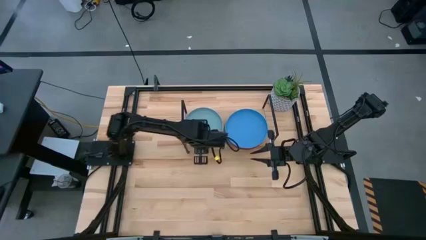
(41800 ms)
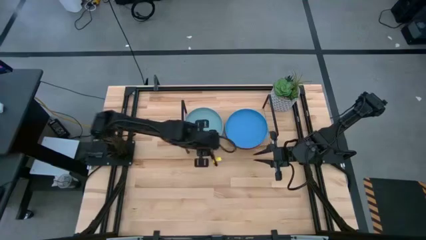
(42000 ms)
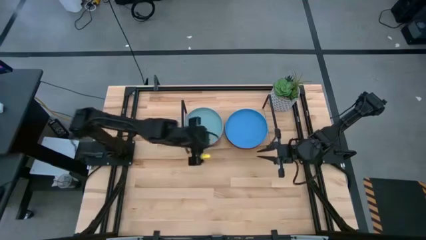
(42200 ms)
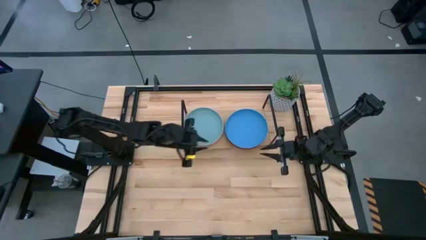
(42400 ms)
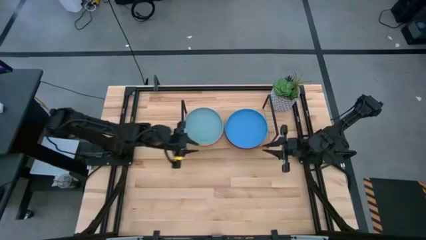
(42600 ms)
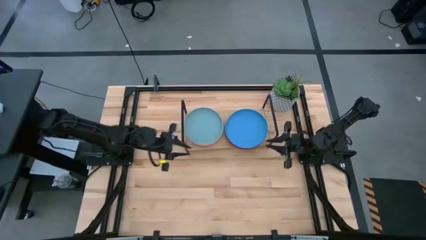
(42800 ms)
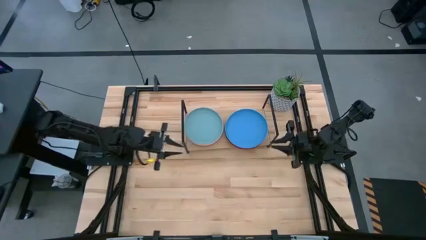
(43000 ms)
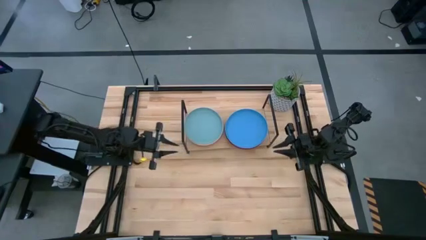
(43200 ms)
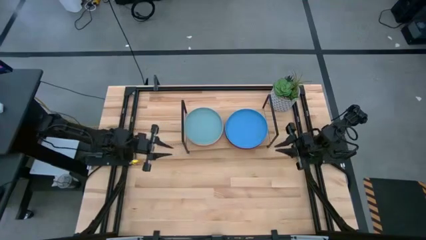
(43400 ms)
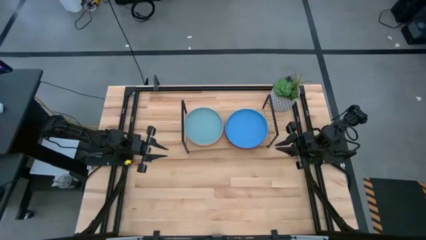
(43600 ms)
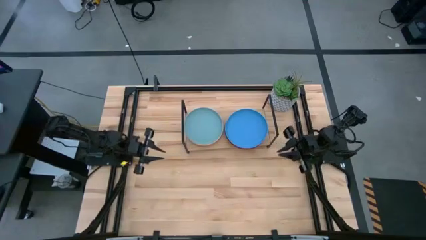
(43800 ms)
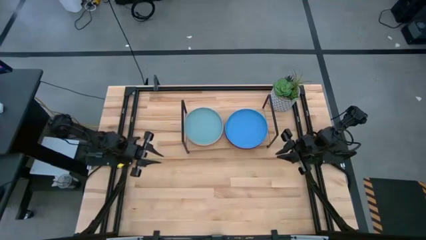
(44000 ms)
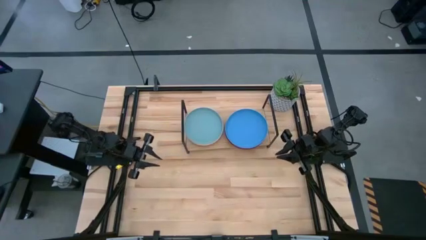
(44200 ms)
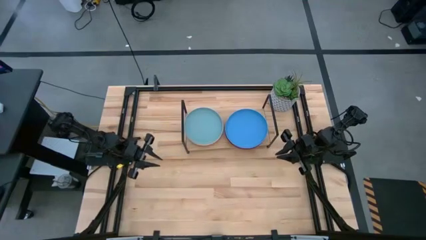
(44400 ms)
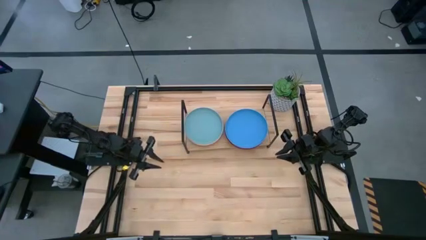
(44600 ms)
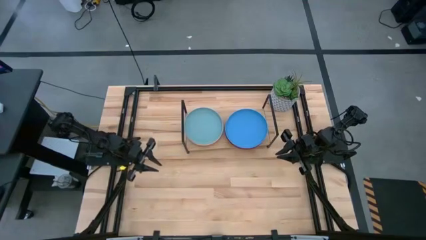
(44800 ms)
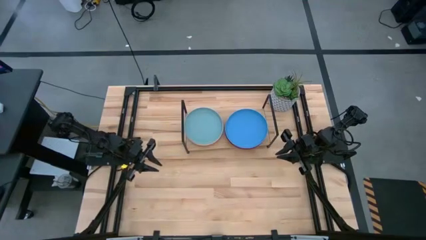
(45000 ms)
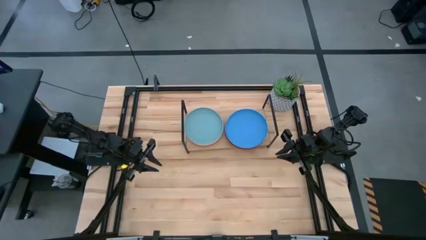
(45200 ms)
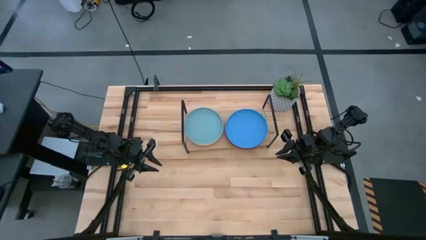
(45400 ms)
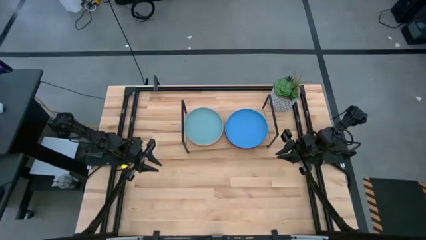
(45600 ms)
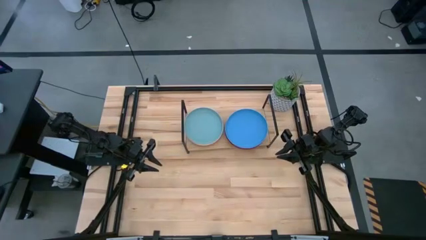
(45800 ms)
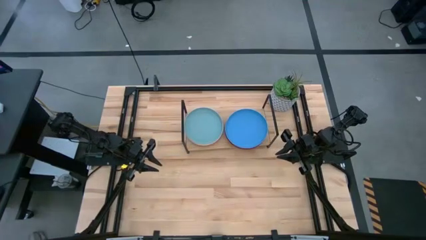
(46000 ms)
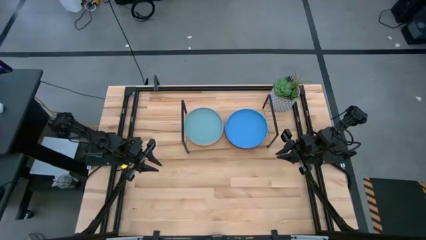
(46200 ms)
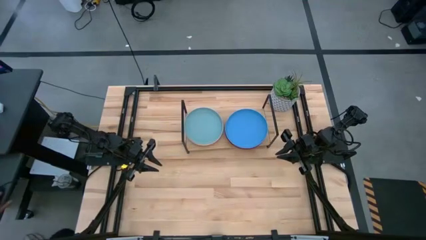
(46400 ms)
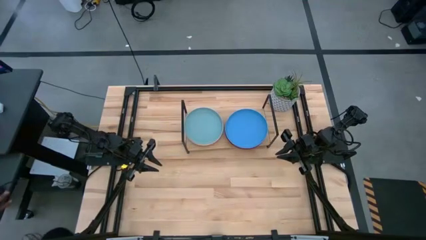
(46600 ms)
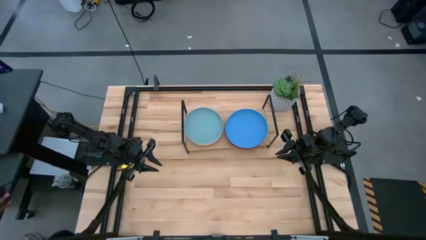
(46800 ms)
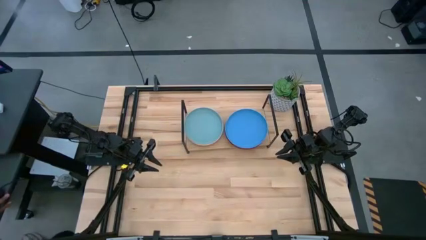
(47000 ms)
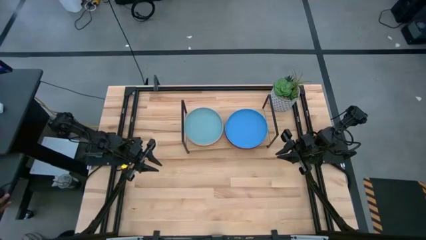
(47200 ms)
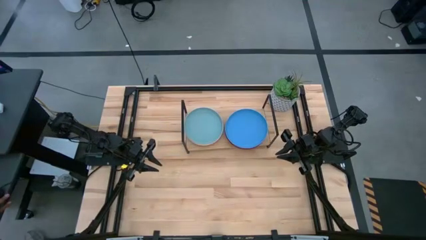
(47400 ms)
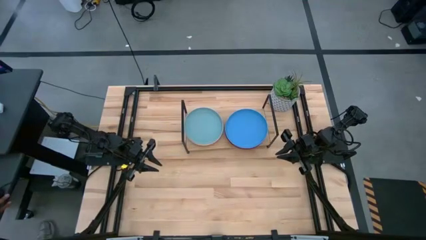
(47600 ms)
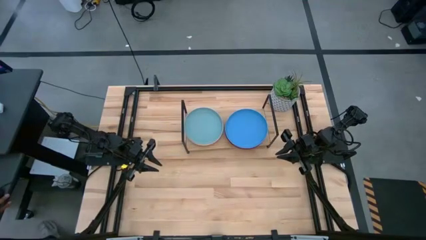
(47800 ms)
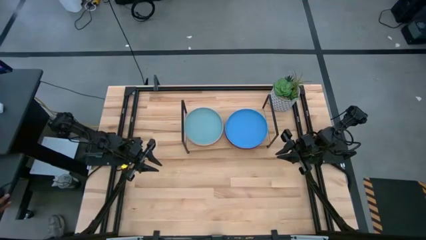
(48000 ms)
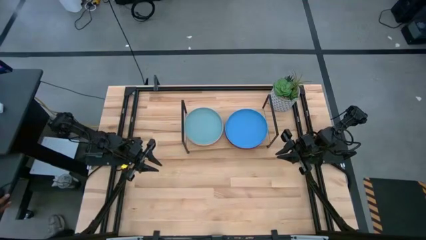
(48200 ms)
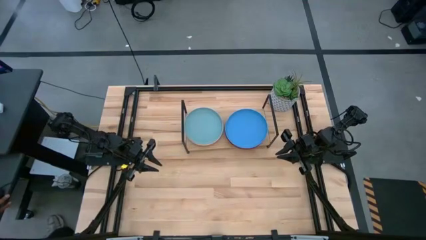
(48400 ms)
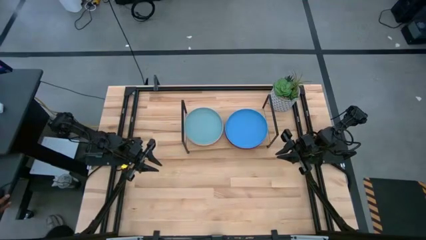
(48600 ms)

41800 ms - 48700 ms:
Task: Place and stack plates onto a shelf
Return to Home Position

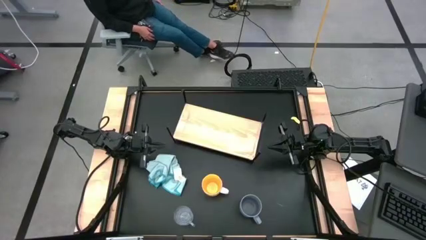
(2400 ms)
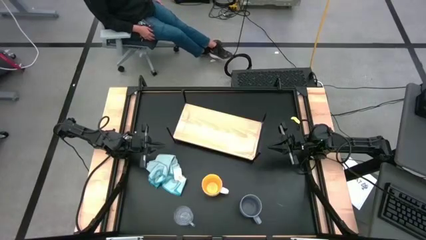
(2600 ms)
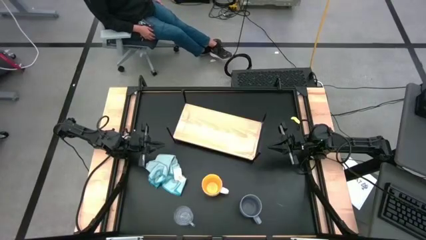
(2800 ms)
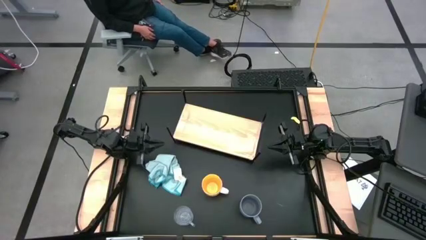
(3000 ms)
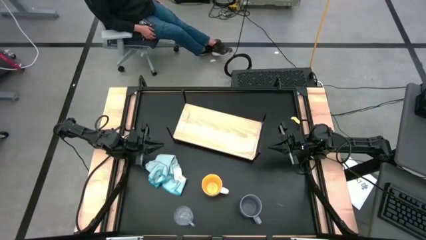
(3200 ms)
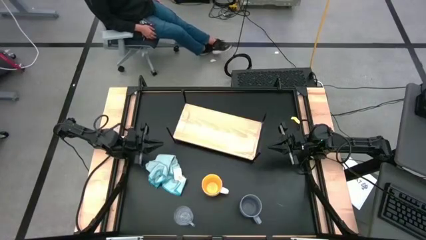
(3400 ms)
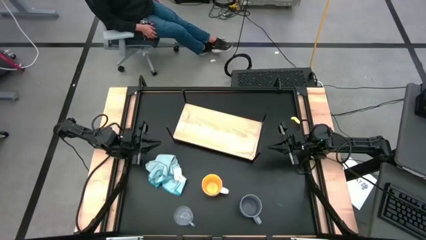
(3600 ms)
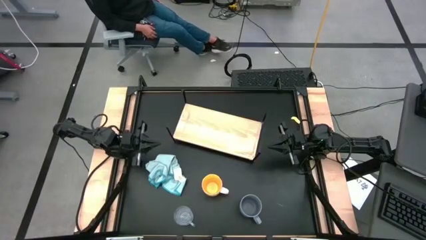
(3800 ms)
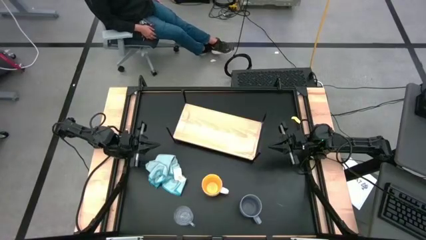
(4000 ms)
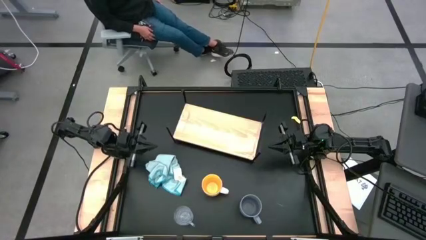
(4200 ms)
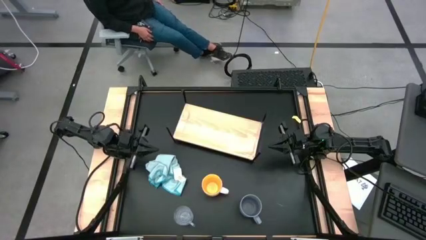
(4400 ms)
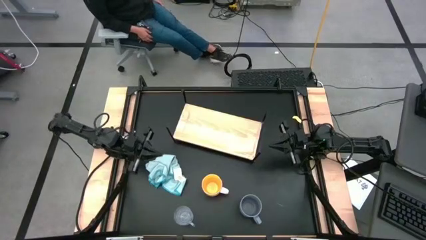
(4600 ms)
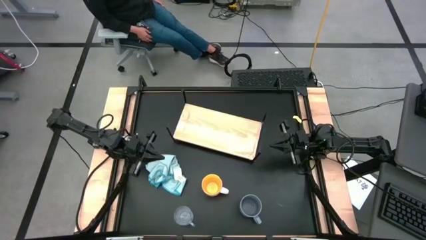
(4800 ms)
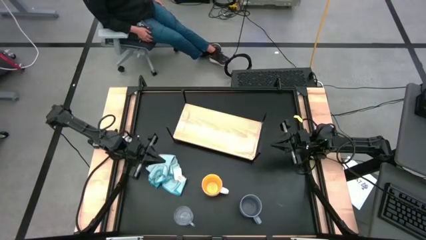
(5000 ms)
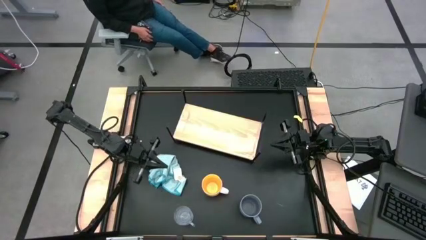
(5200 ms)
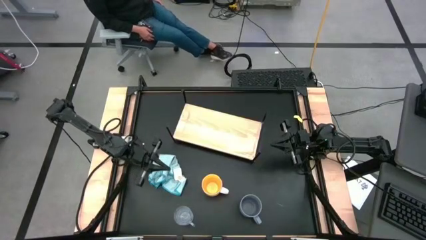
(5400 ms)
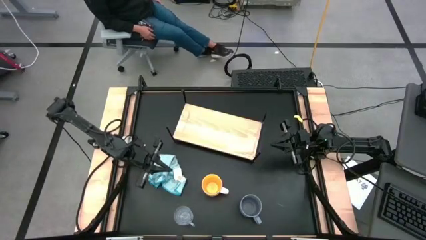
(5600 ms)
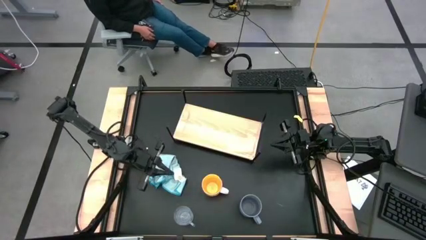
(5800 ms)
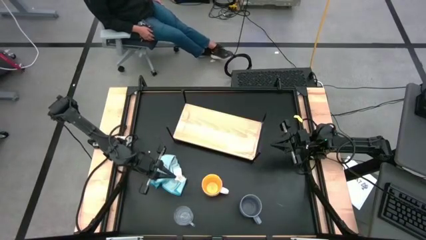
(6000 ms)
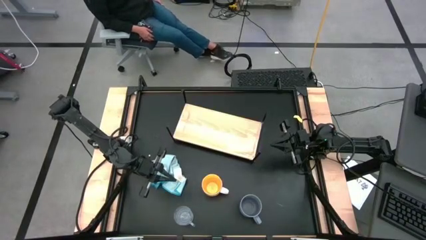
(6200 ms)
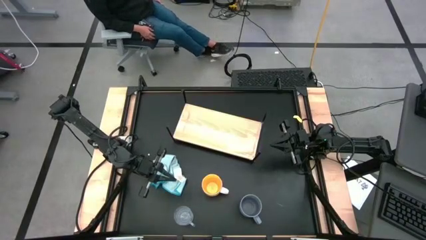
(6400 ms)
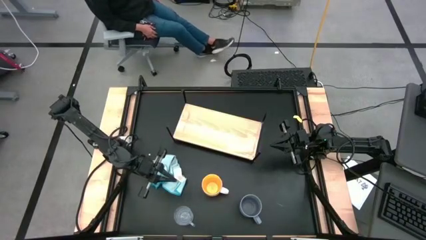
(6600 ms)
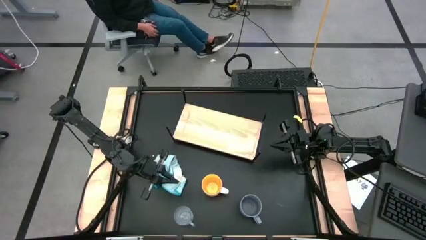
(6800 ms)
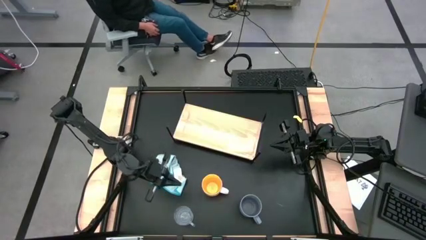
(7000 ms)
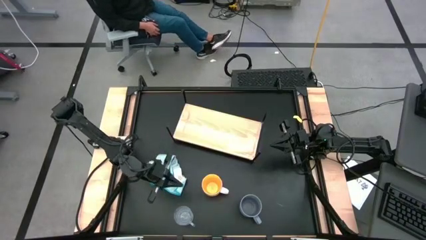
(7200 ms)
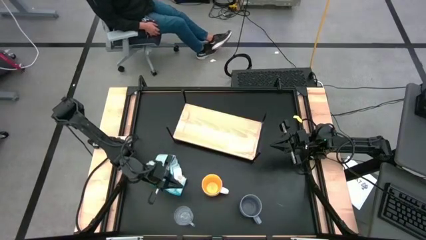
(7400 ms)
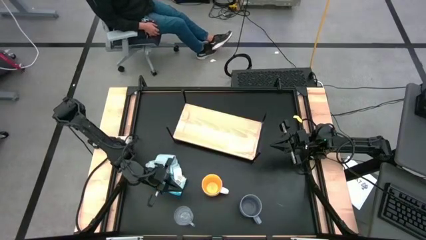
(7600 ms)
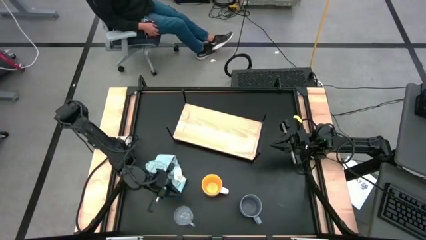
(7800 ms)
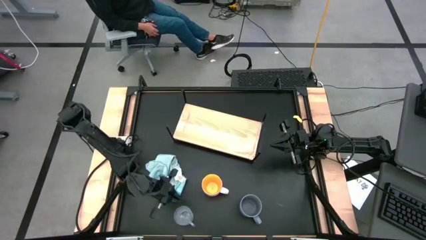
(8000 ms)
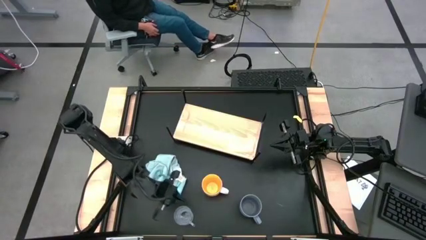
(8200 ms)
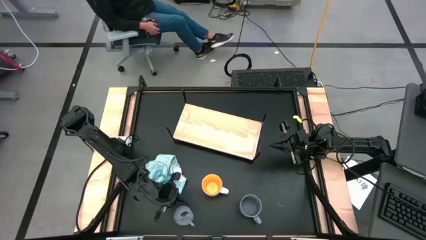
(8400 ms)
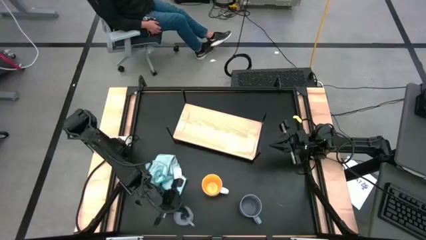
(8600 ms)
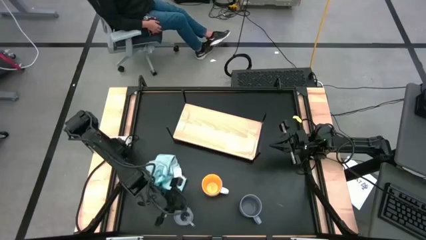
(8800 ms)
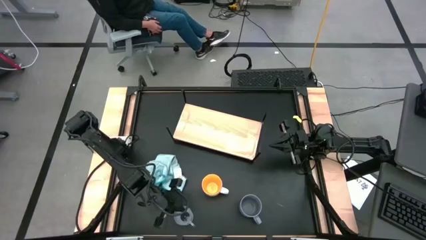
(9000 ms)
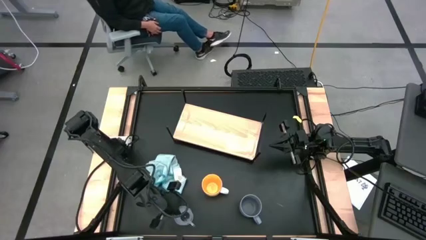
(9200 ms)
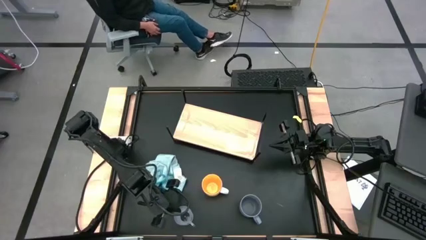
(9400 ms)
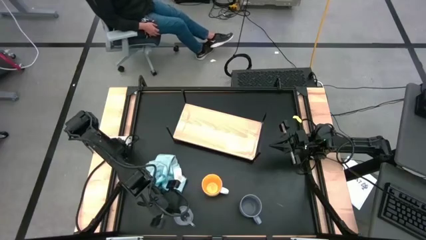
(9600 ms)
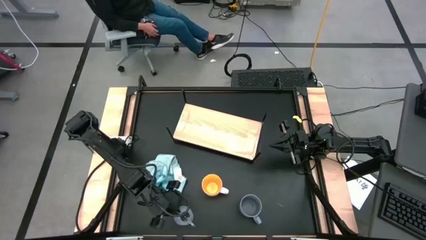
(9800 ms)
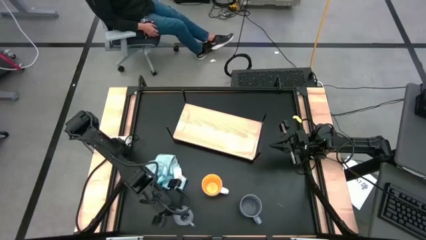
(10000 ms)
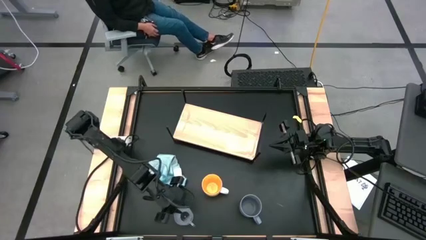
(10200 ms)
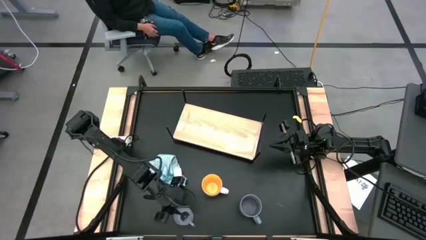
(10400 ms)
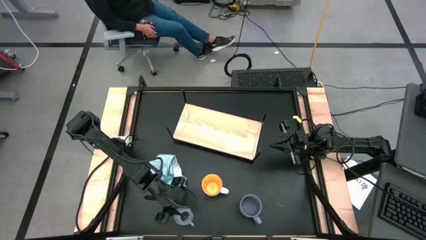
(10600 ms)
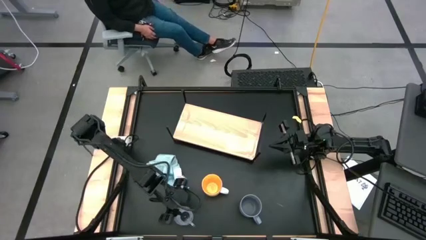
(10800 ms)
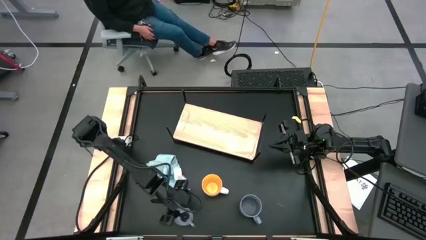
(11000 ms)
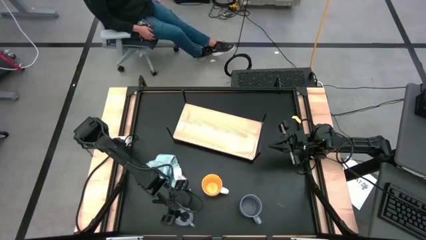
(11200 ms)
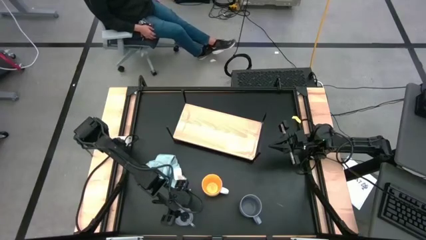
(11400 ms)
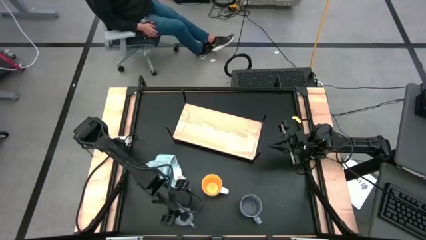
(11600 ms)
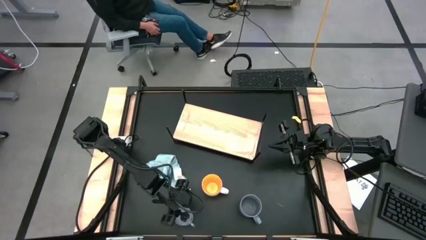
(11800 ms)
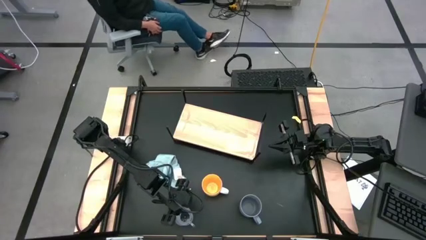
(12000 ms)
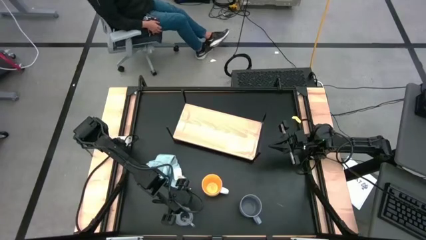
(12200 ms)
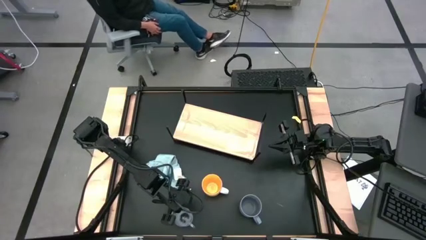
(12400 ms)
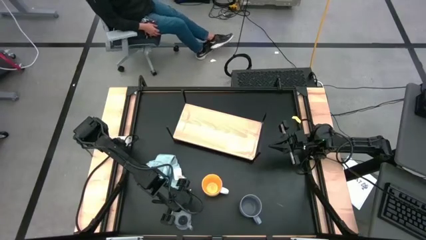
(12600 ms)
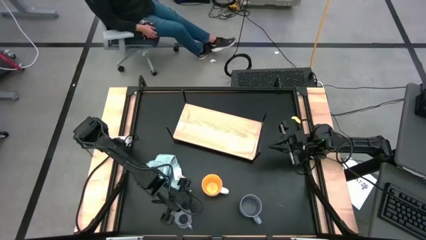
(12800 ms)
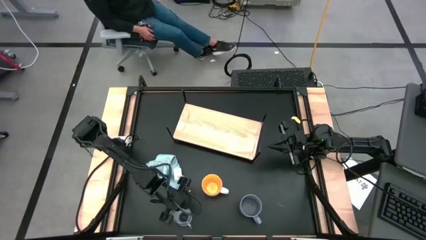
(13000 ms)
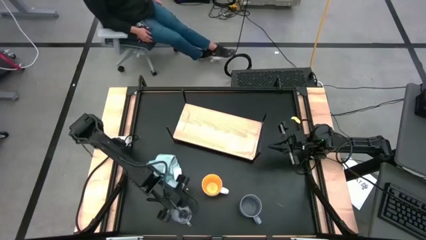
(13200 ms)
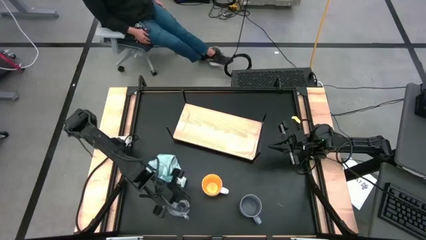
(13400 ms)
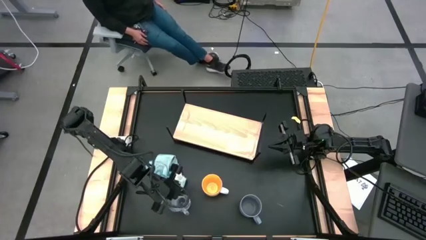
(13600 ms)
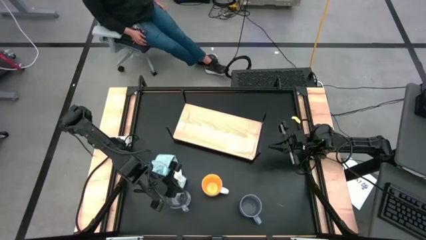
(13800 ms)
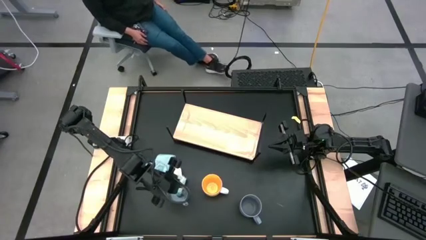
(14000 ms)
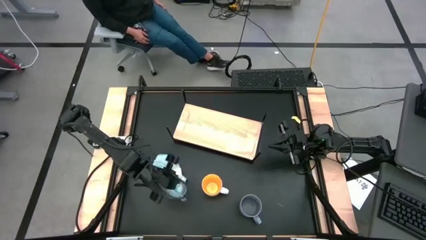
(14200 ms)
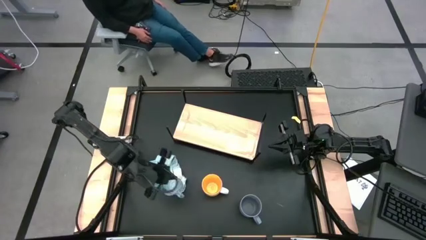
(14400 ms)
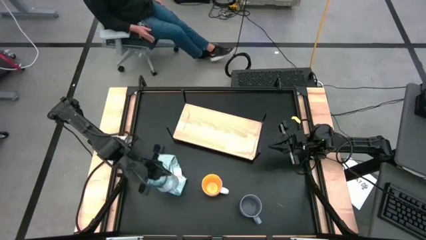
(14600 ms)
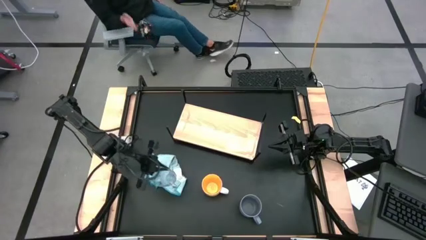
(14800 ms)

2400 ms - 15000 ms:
Task: Stack small to large cups/mugs on shelf
Put the transparent mug on the shelf
